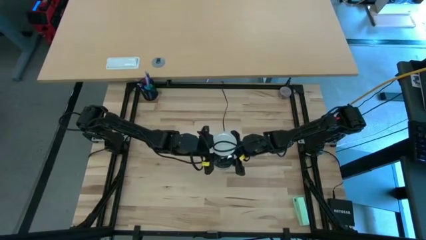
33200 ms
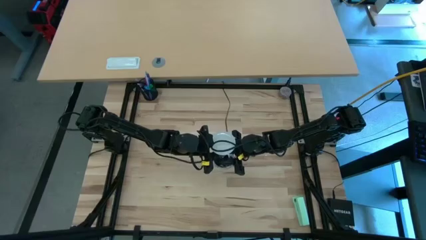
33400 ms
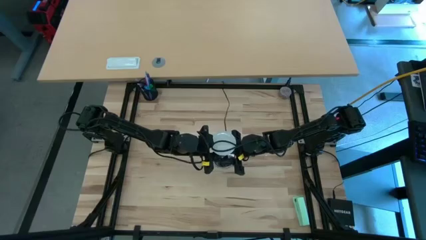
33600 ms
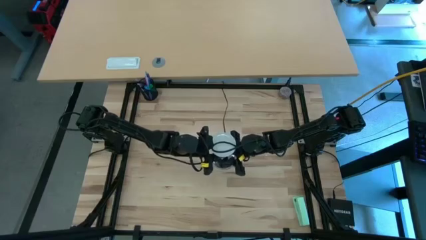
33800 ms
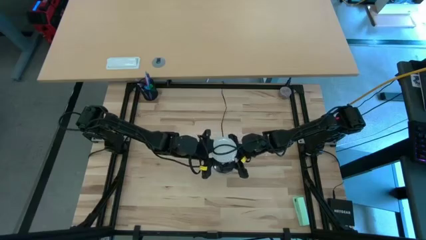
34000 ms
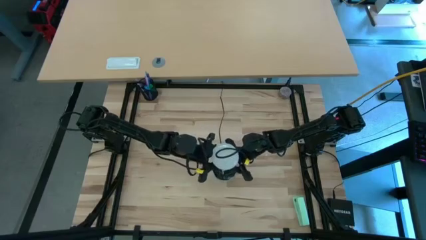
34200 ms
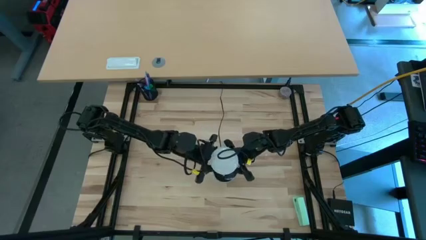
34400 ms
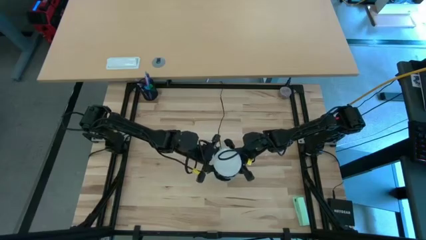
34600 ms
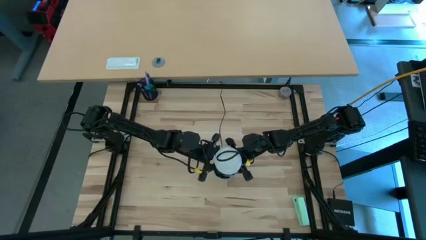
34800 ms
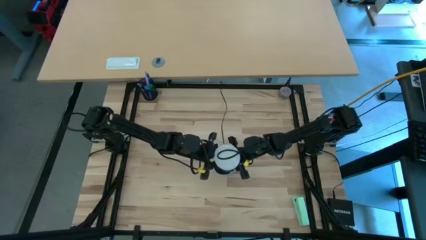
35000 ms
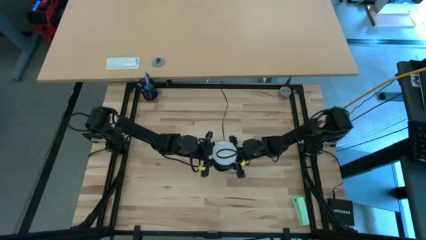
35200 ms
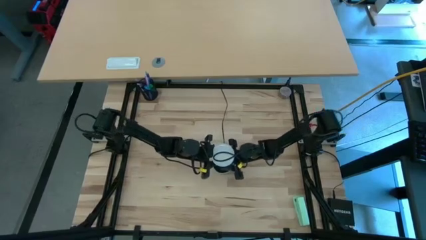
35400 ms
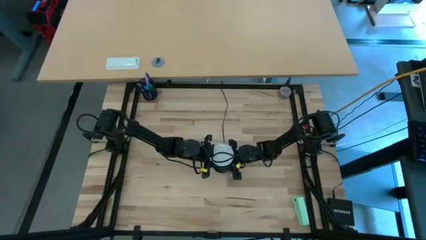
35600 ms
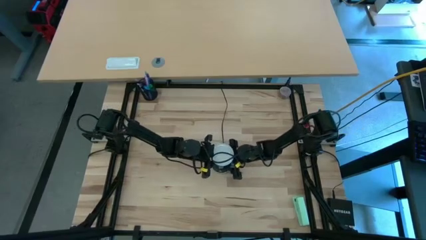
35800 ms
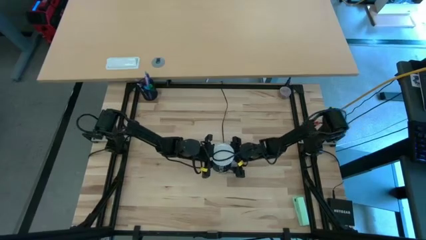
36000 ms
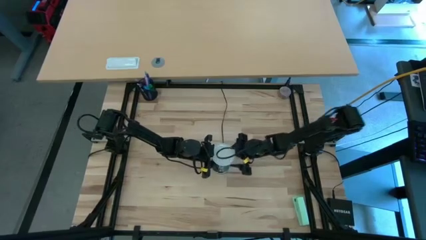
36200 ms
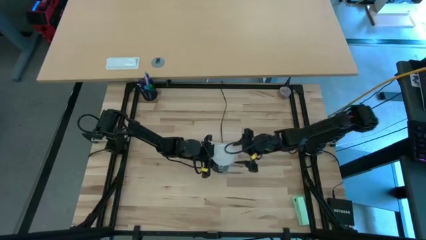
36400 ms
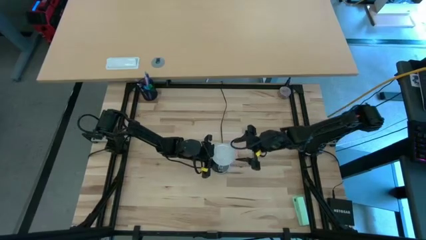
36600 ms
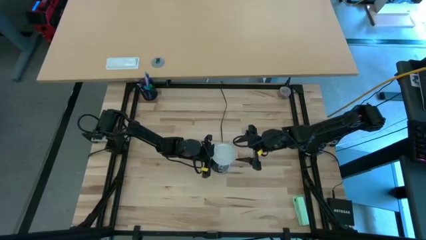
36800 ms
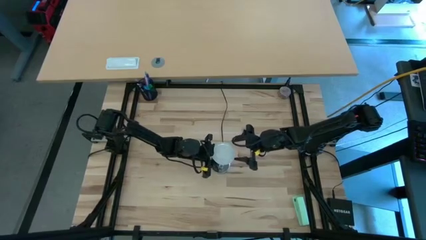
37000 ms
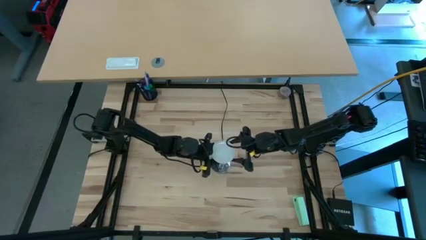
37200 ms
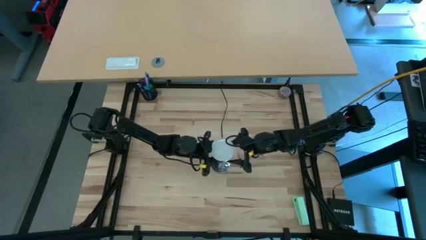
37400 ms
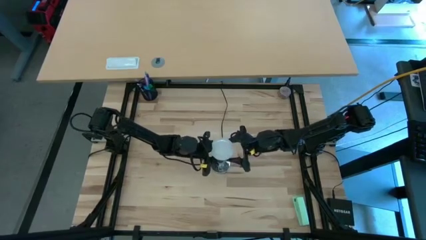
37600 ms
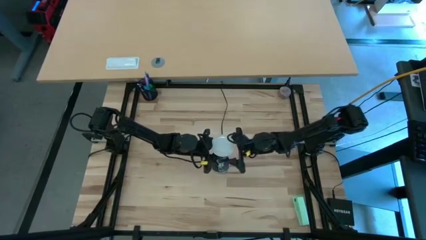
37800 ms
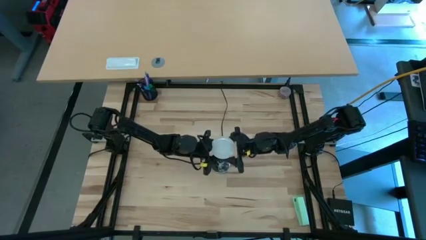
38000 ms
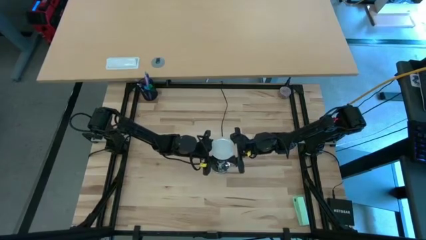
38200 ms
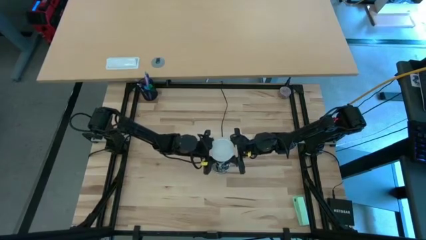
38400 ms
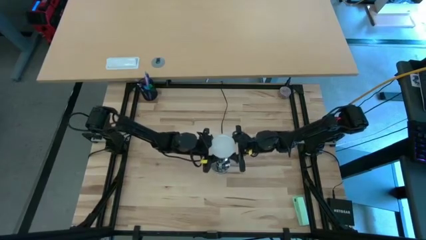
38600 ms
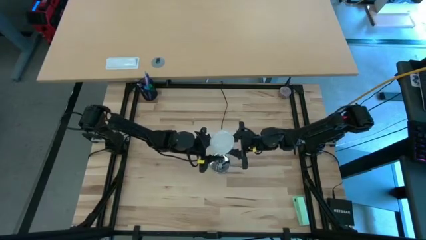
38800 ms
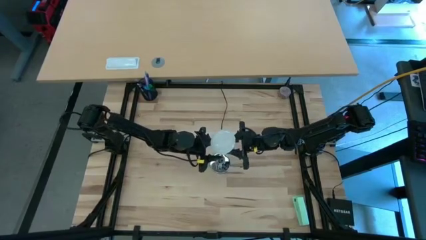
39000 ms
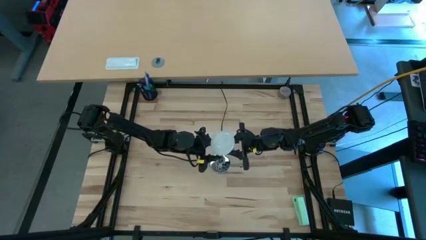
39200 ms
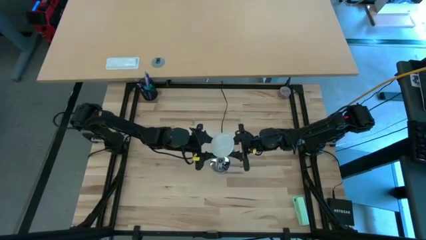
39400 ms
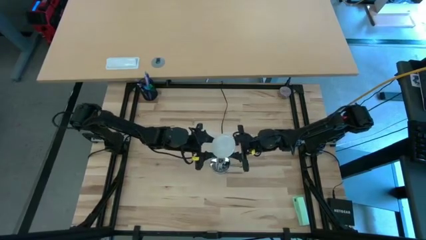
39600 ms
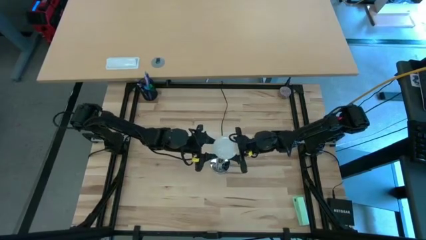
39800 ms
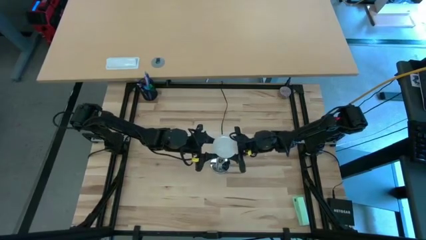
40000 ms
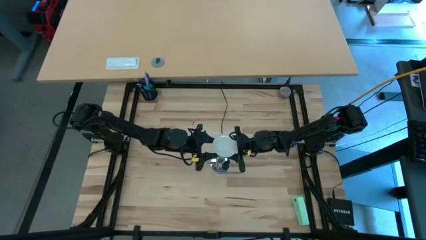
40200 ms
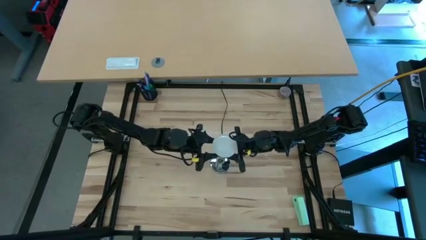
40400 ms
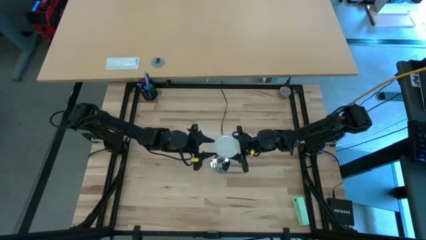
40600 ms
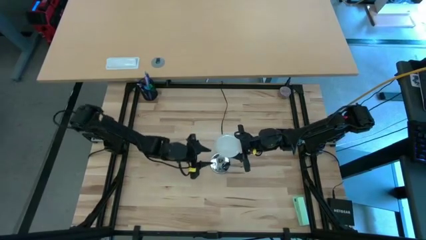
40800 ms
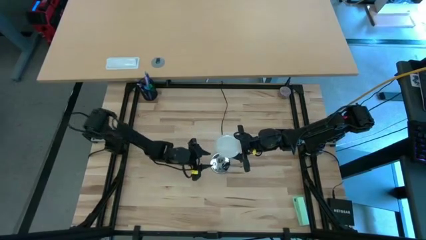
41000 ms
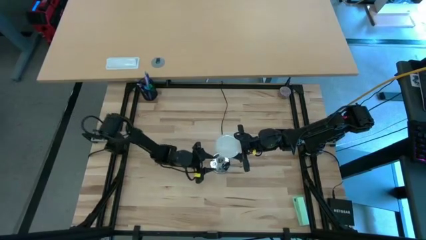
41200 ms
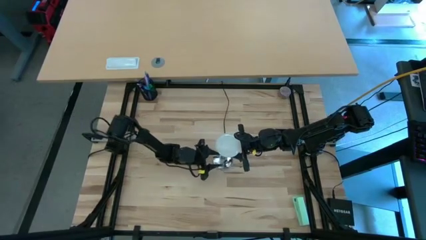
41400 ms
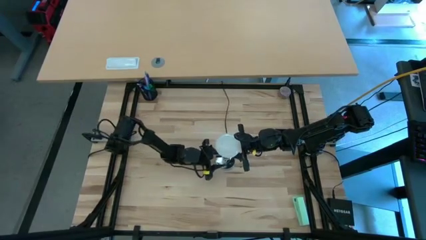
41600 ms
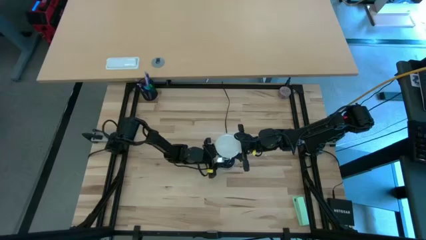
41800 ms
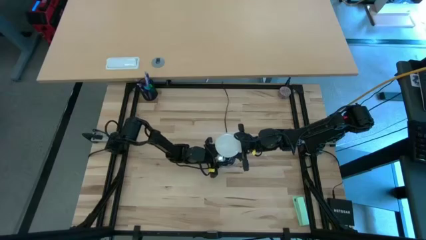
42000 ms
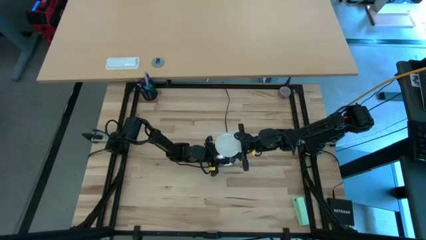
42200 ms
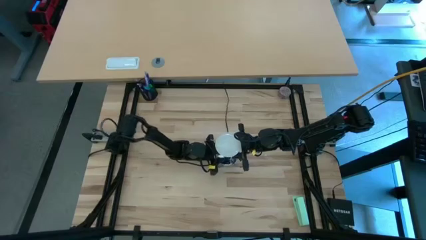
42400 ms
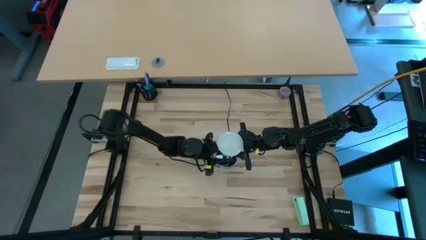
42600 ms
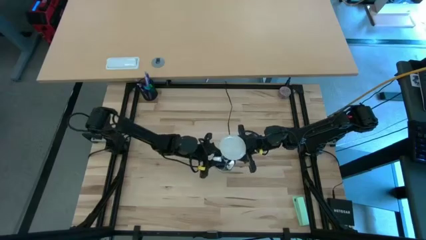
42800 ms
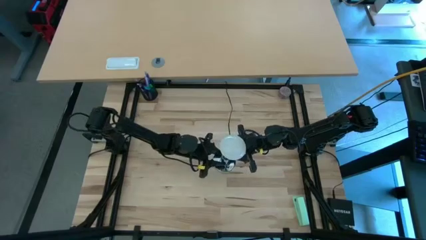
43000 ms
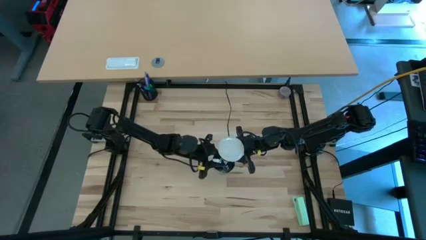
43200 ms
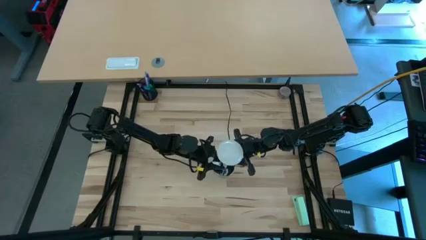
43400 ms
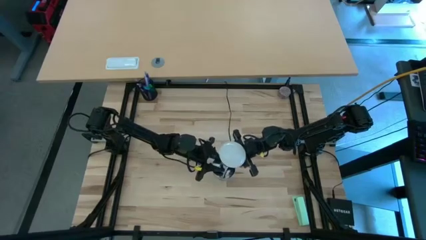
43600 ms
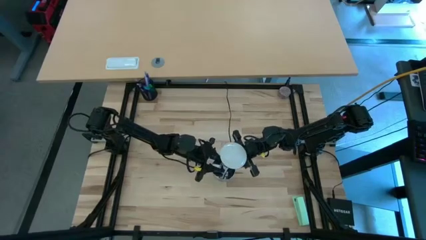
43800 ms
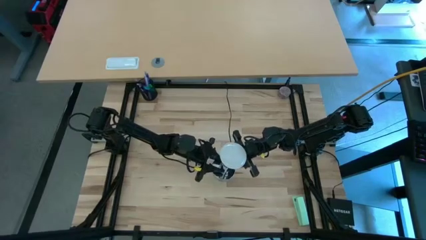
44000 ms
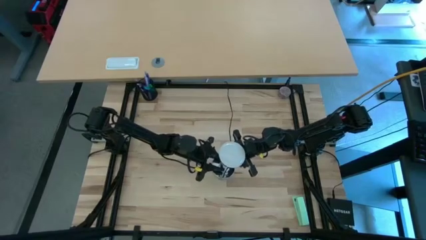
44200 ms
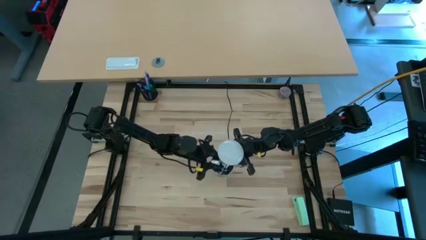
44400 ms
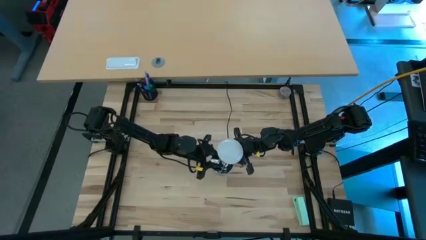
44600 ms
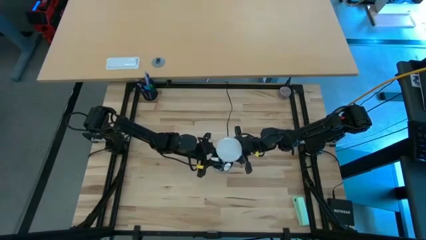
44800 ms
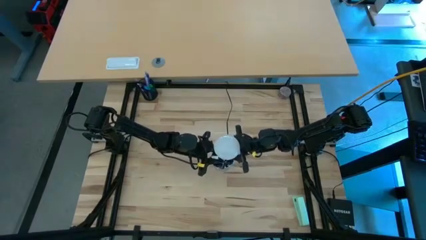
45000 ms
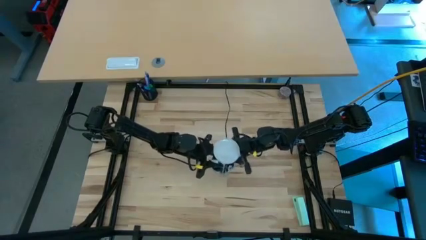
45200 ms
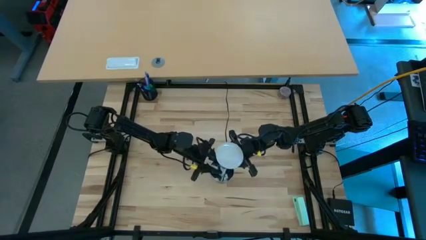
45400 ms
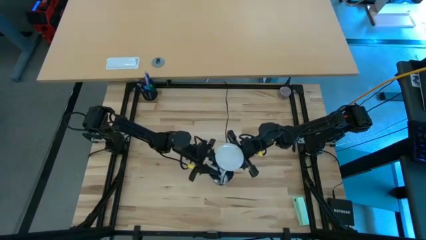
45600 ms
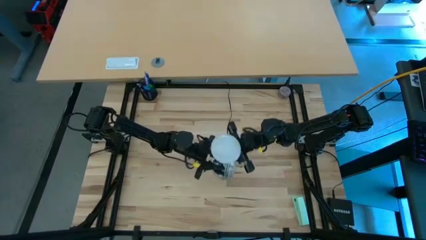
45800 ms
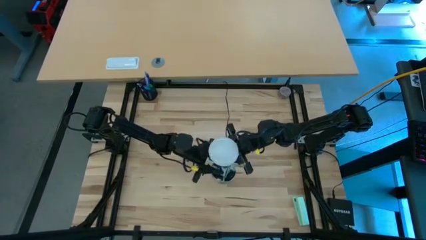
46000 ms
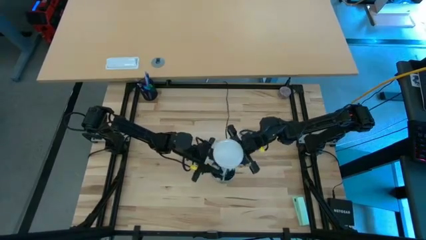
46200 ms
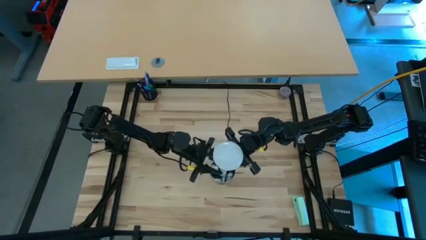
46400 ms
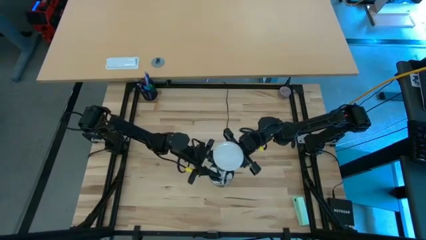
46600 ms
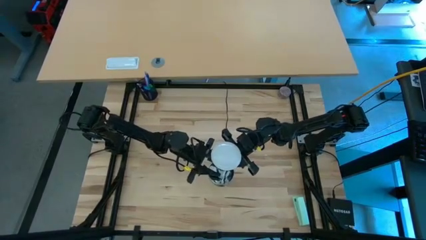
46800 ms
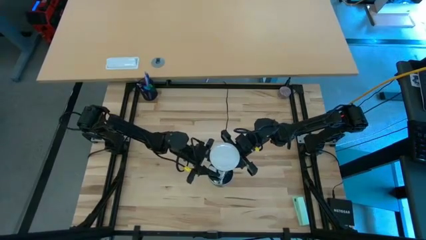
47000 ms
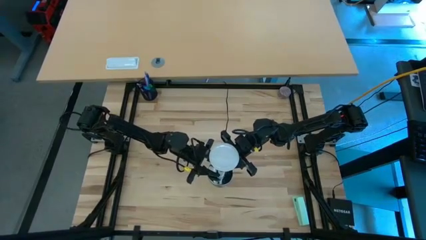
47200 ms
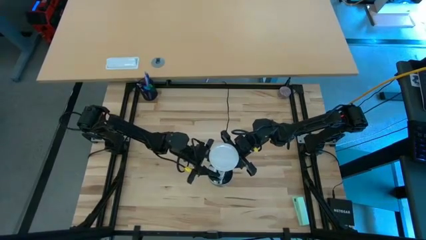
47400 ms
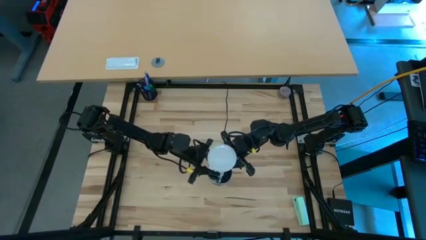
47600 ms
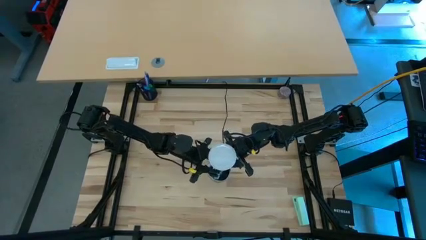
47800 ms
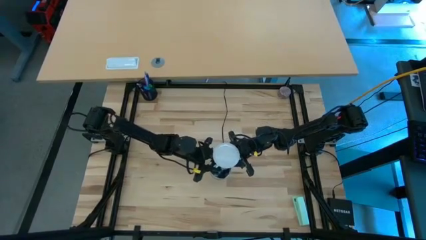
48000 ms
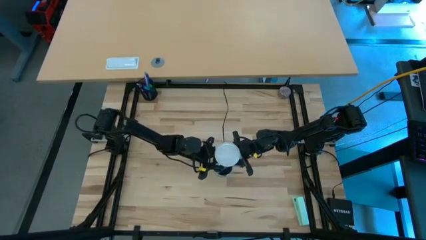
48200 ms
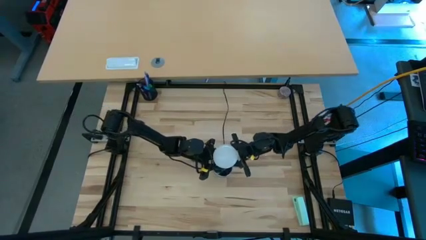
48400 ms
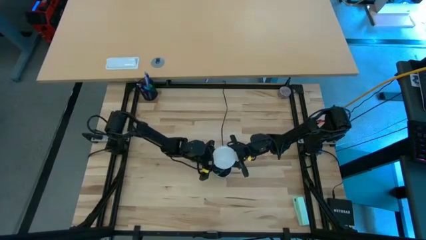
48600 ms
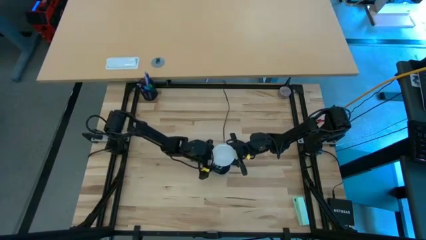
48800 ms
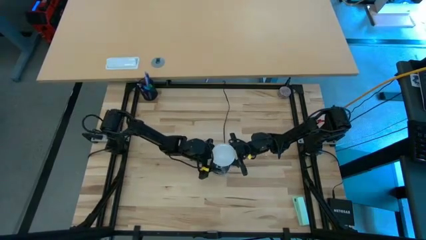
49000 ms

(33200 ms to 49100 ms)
Task: Screw lightbulb
Insert the lightbulb into the lamp
